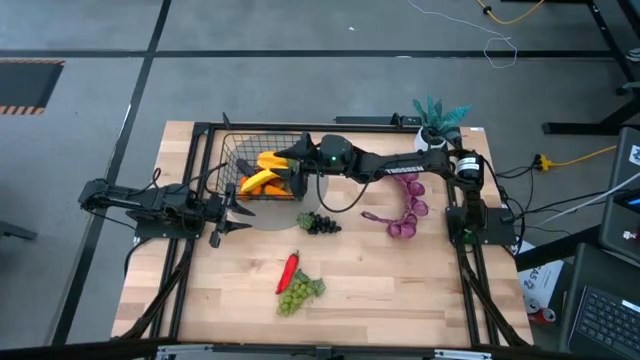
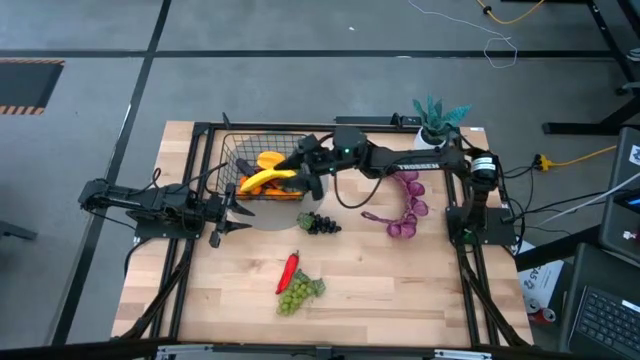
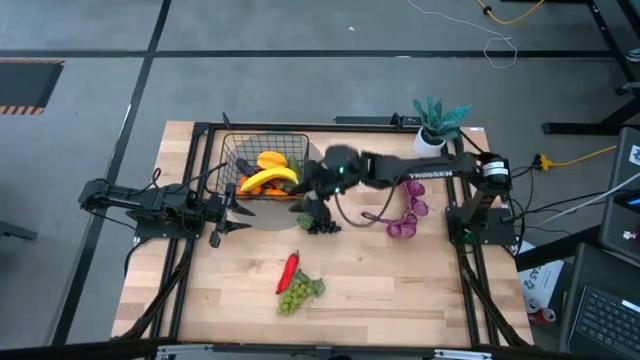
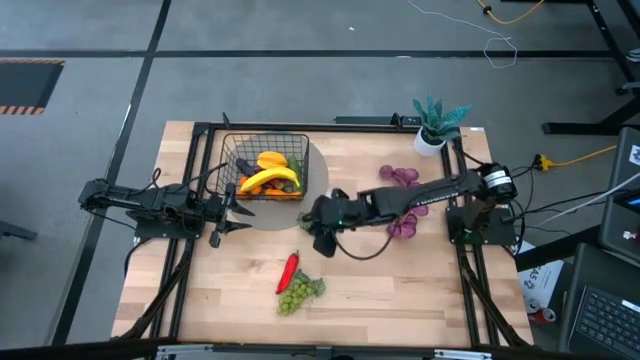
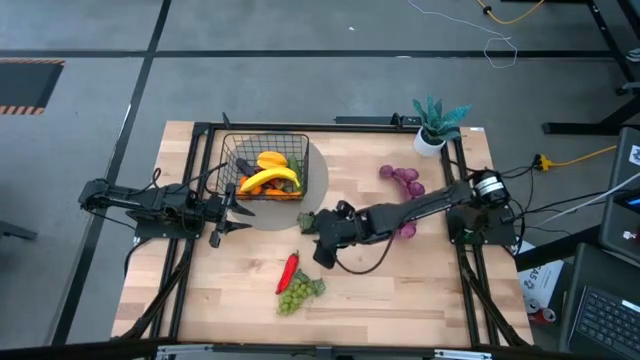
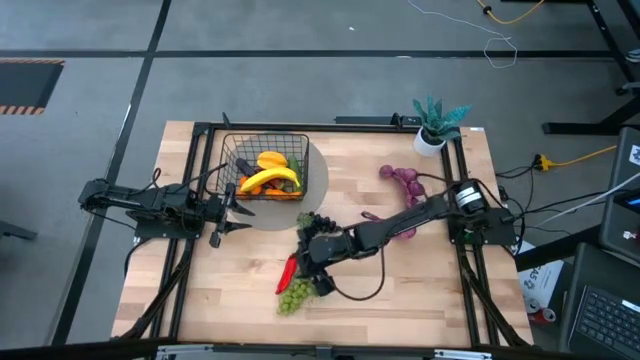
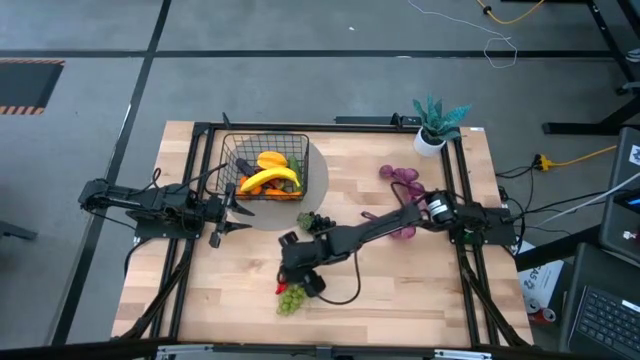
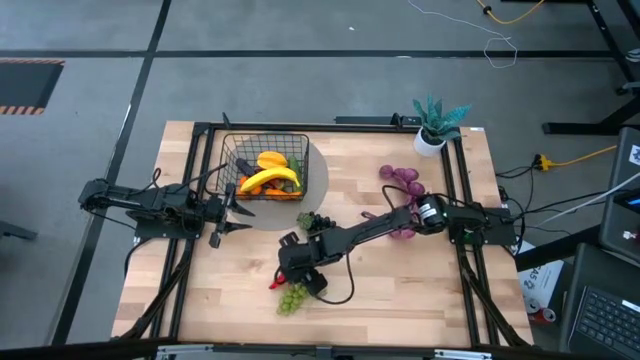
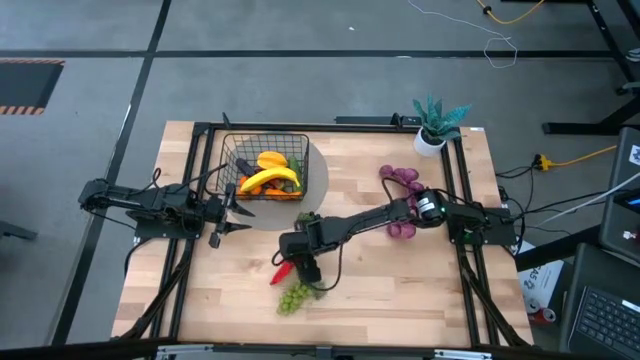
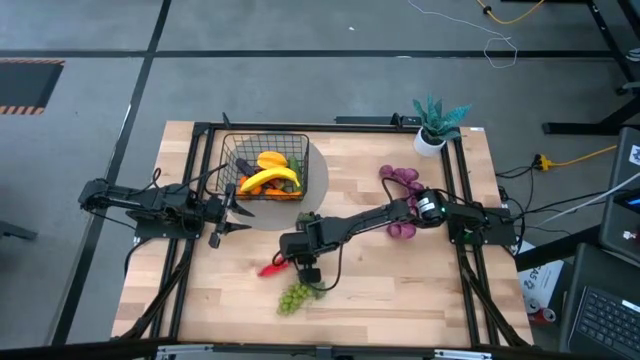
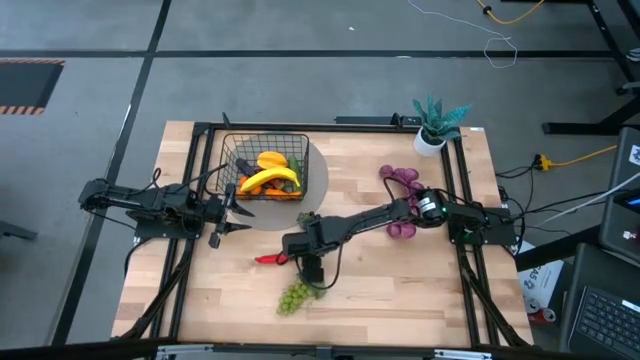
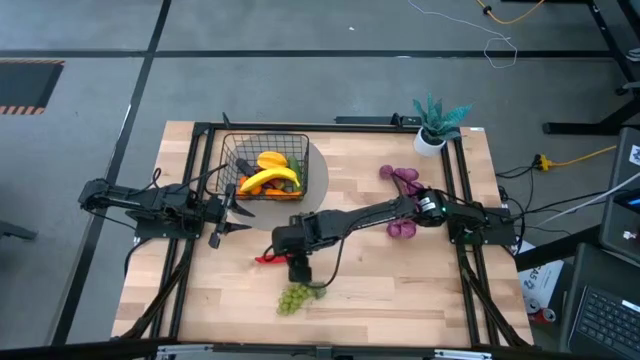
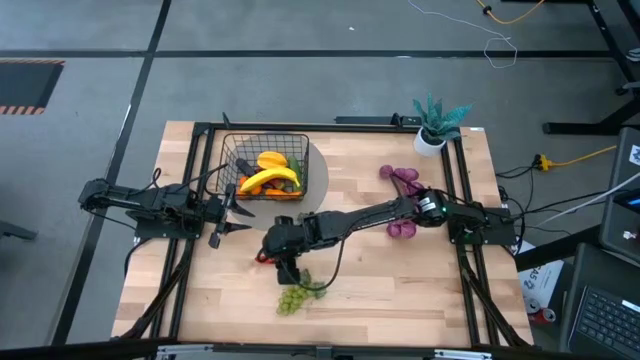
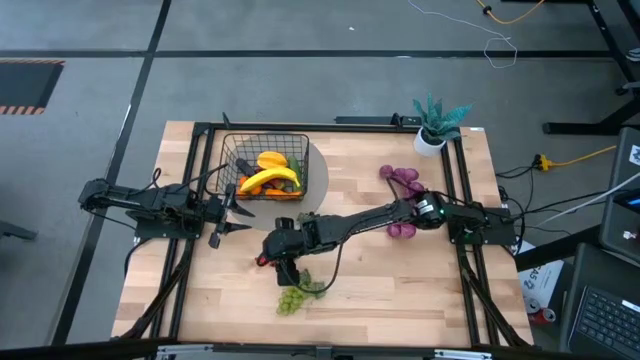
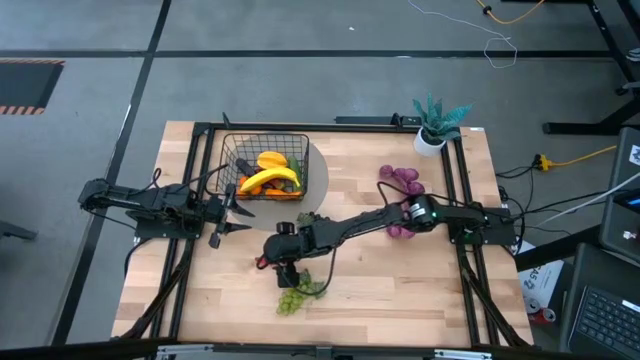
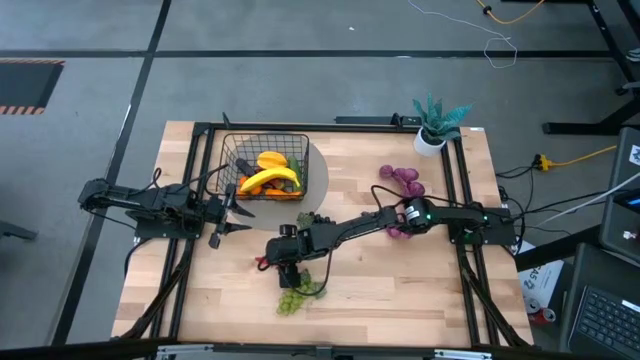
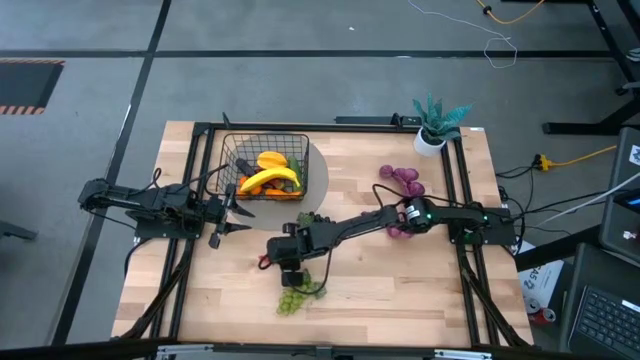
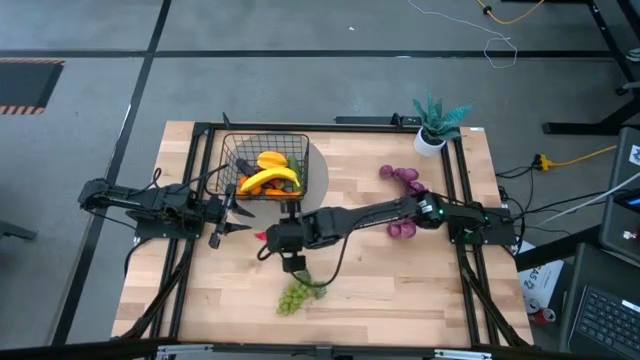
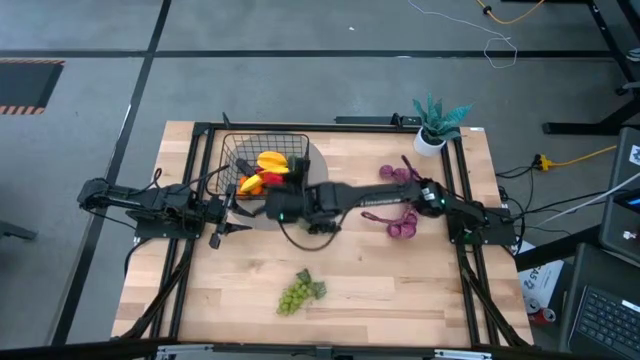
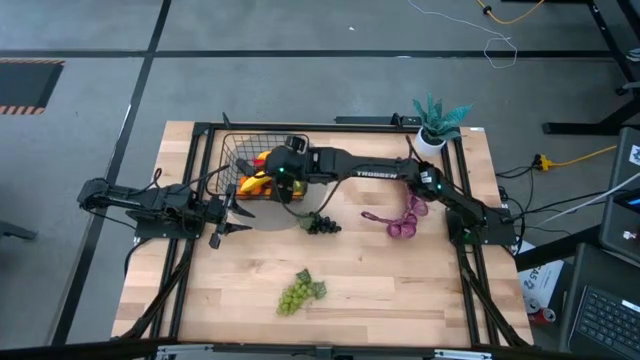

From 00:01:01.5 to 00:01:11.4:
Task: Build produce basket
Put the red chili pepper into the wire basket

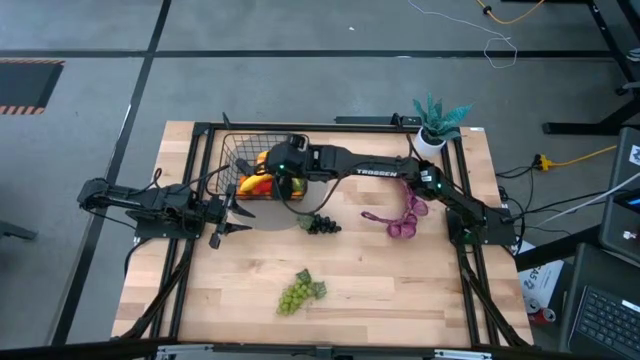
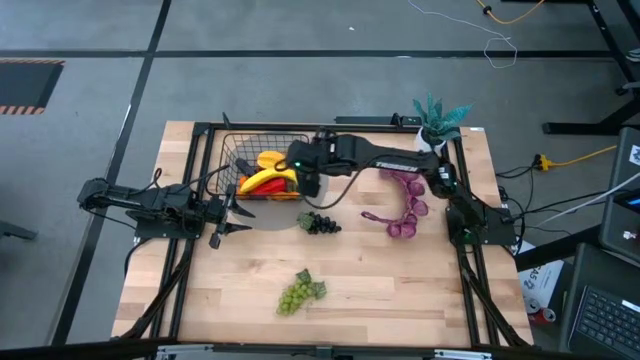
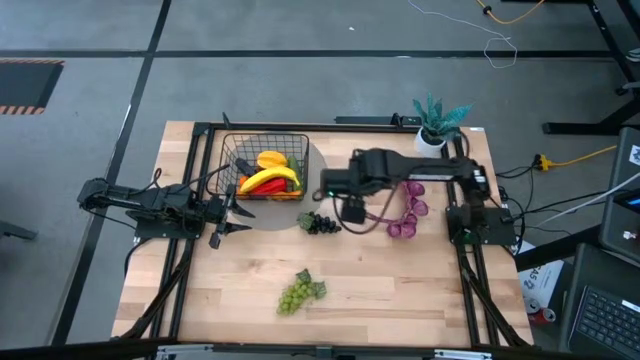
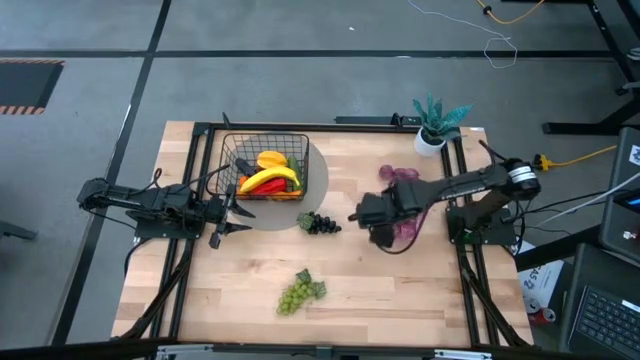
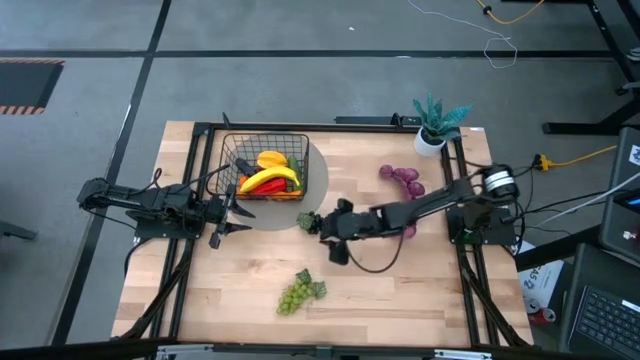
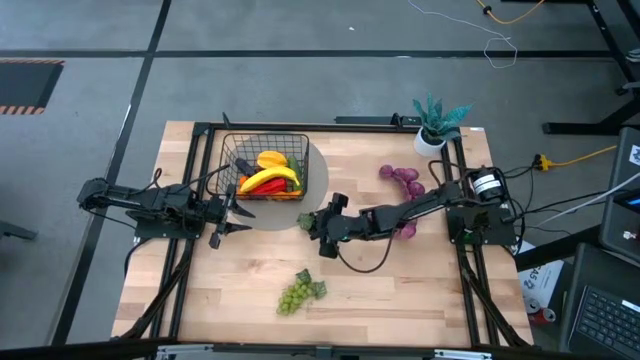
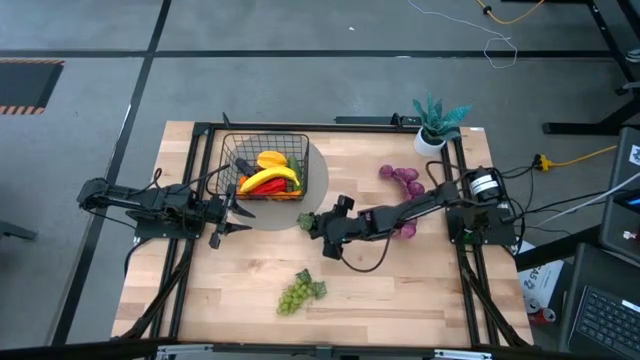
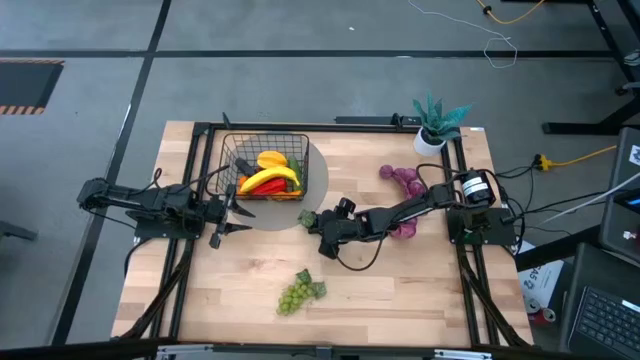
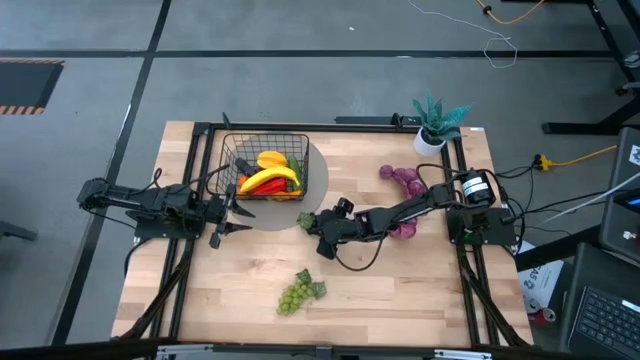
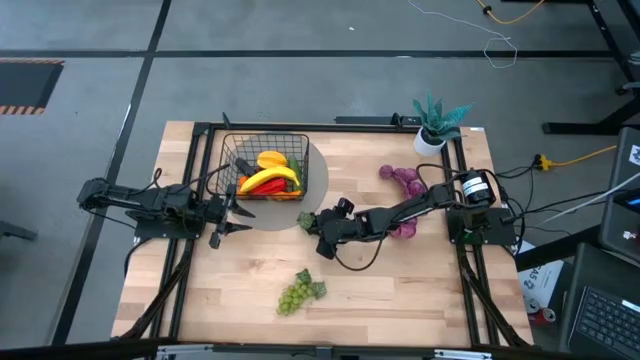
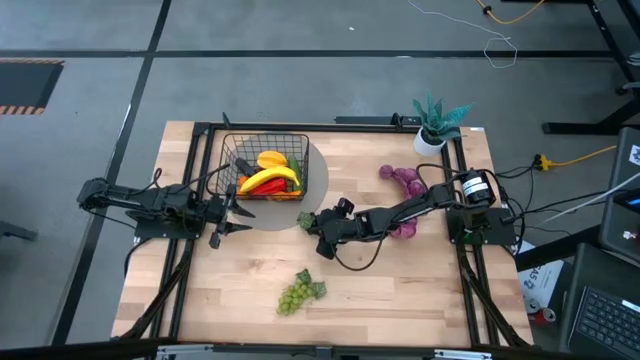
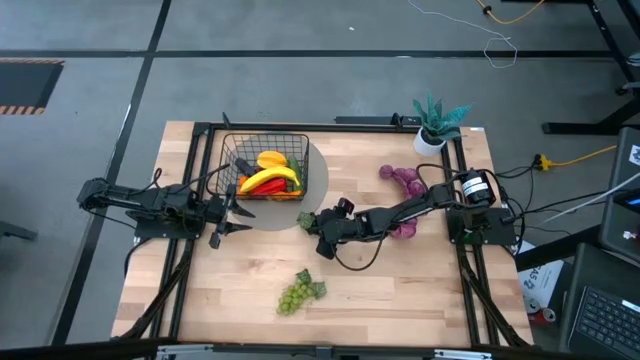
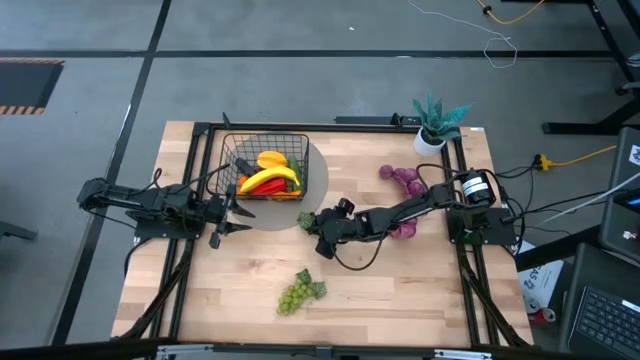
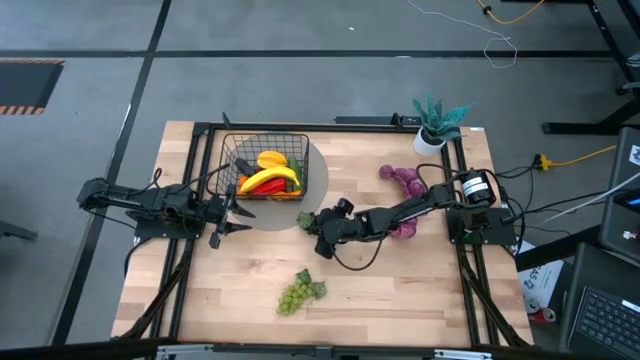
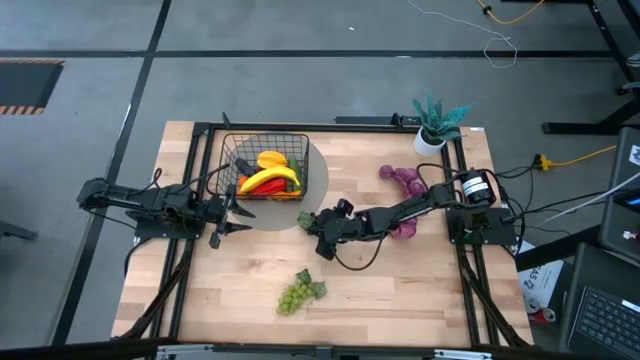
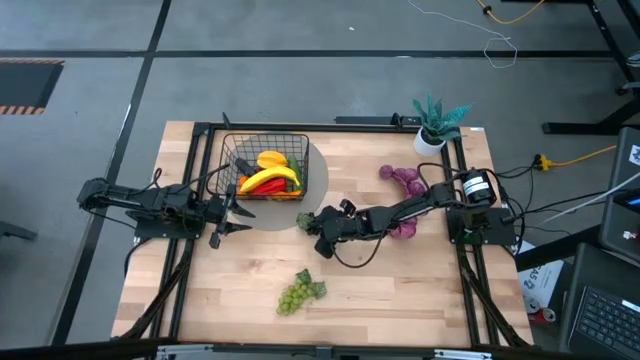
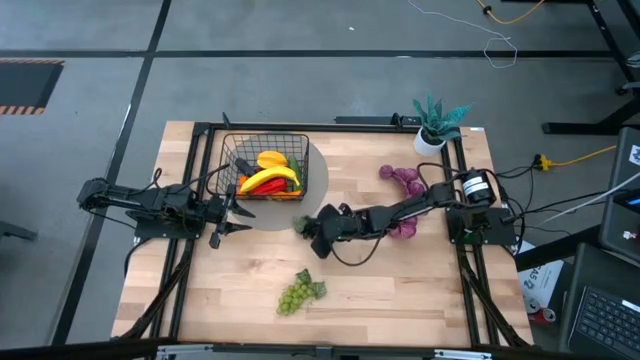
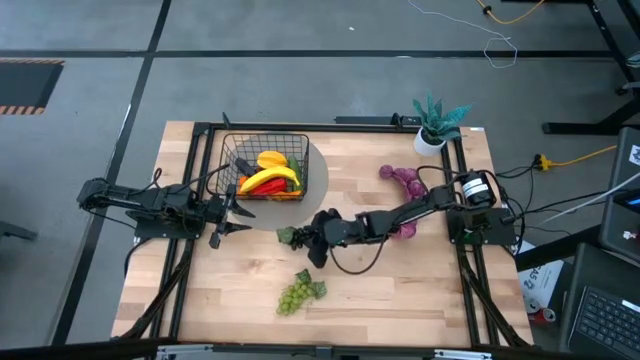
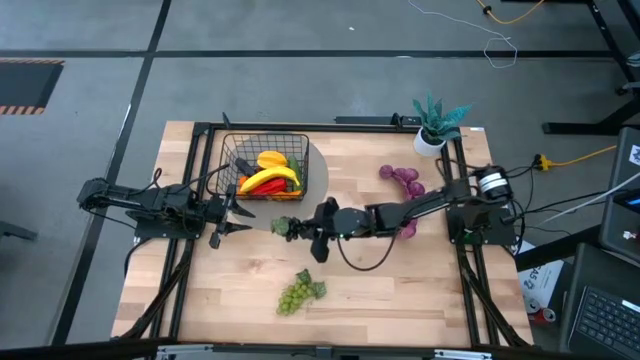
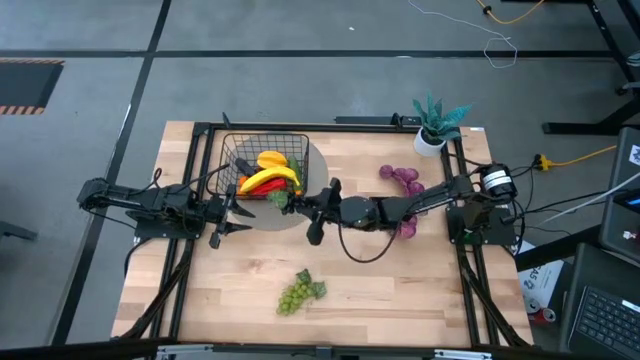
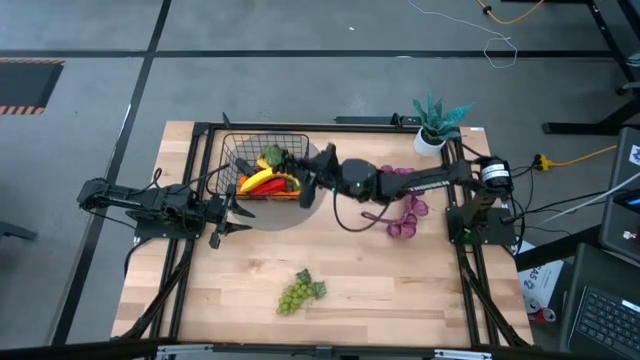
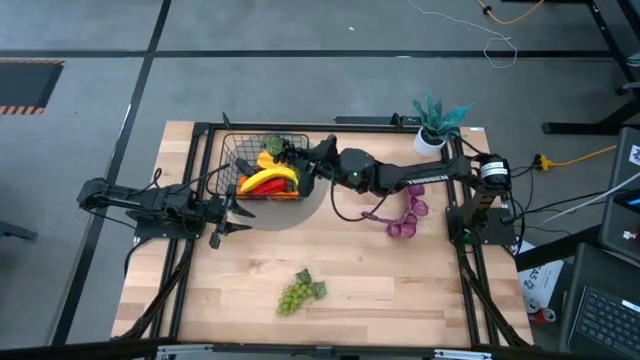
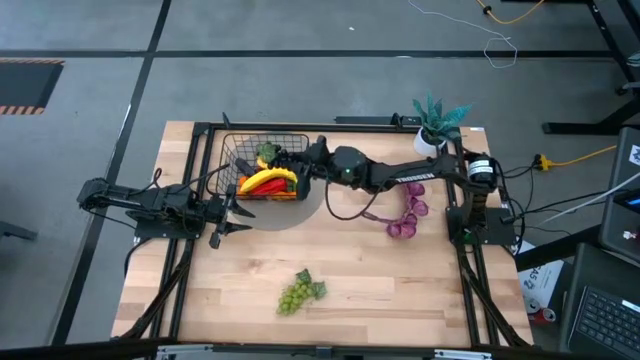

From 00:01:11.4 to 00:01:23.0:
Put the violet grapes into the wire basket
